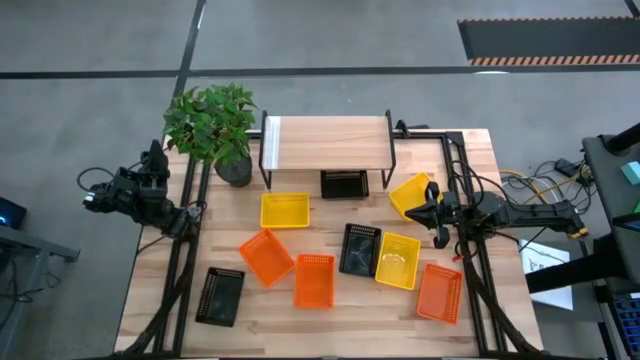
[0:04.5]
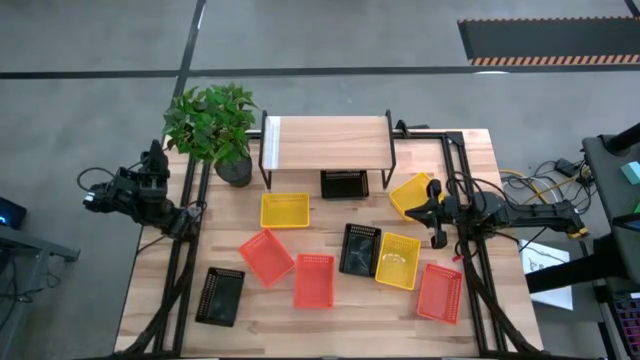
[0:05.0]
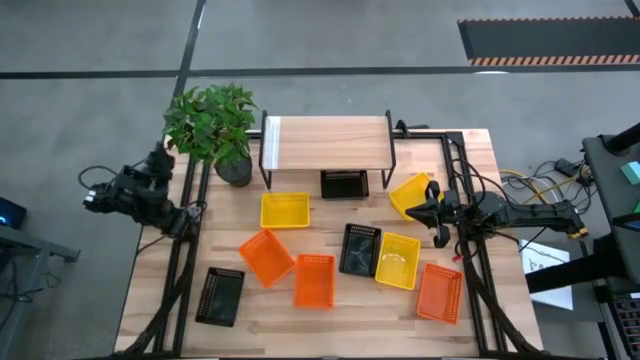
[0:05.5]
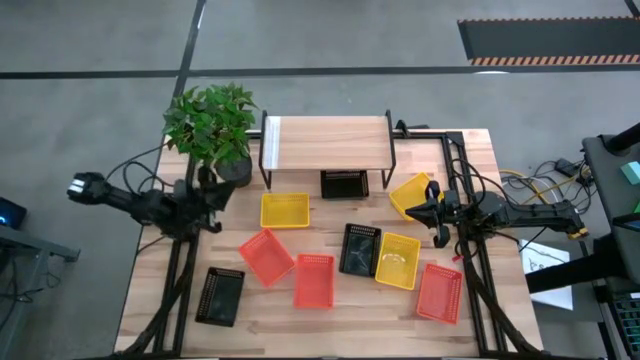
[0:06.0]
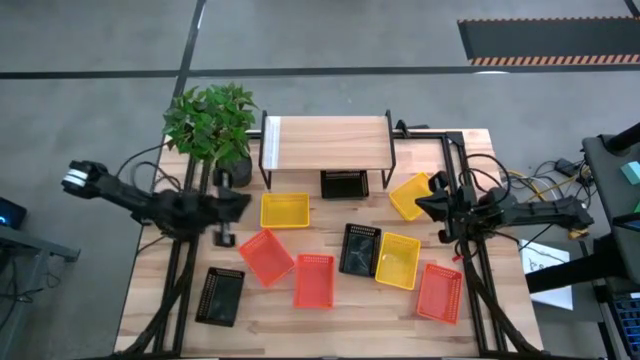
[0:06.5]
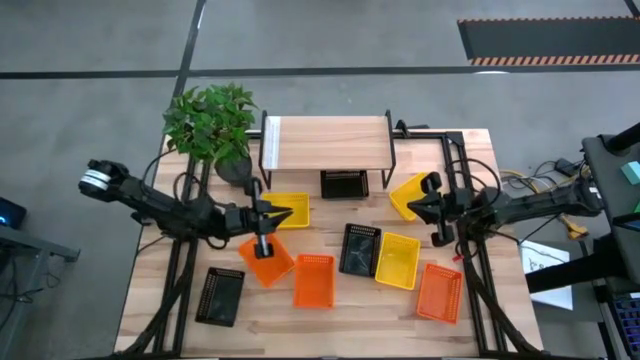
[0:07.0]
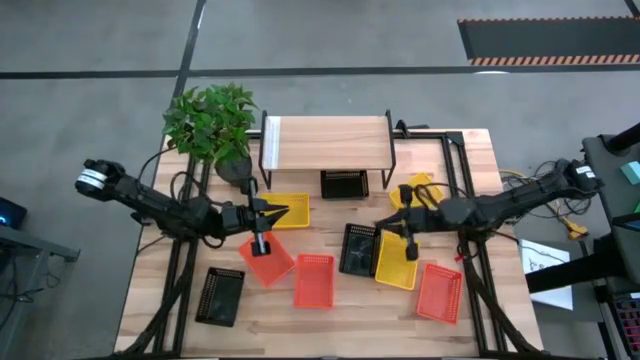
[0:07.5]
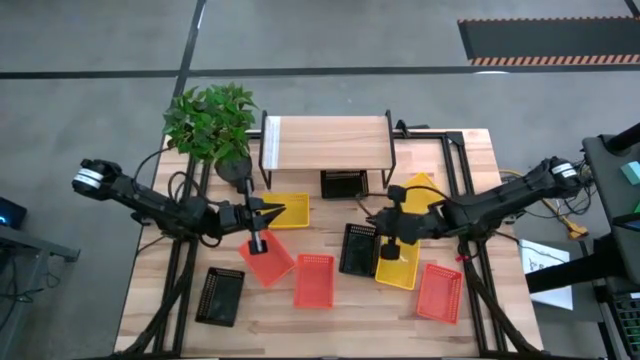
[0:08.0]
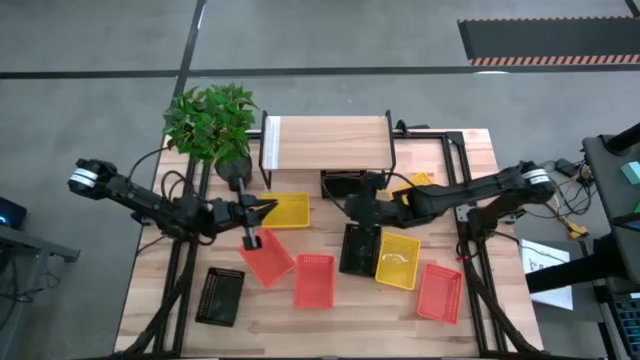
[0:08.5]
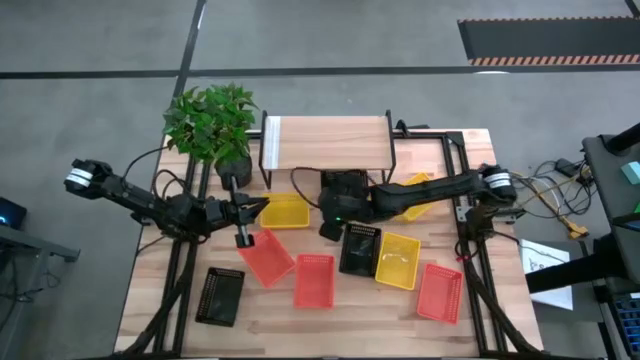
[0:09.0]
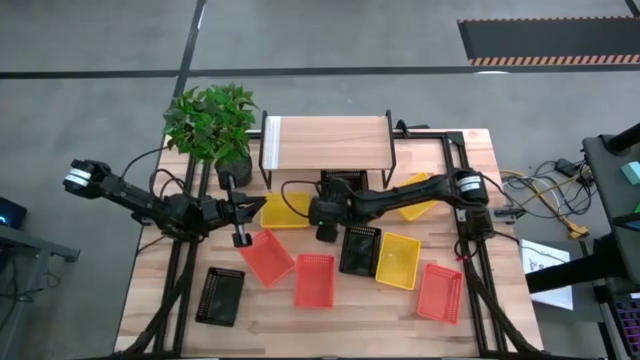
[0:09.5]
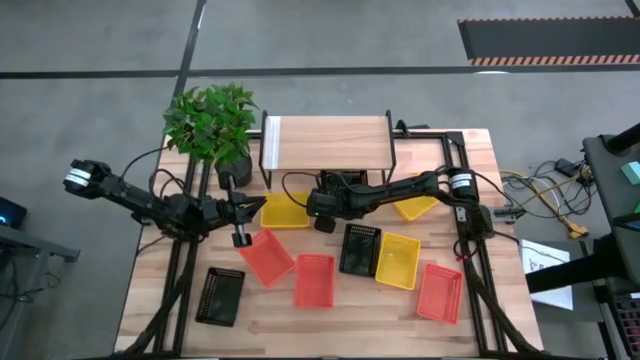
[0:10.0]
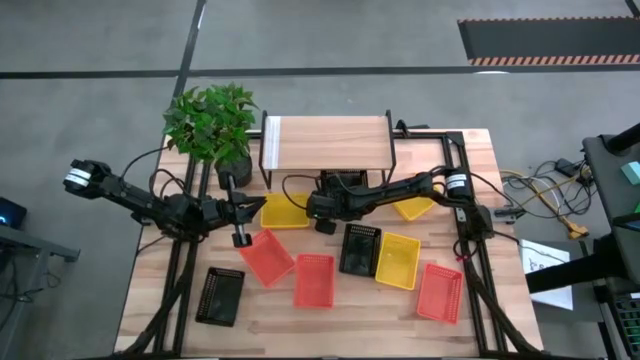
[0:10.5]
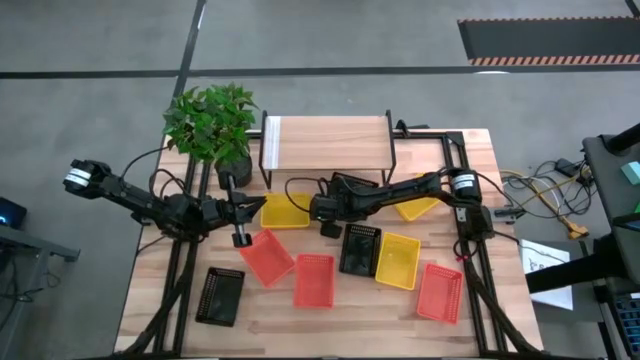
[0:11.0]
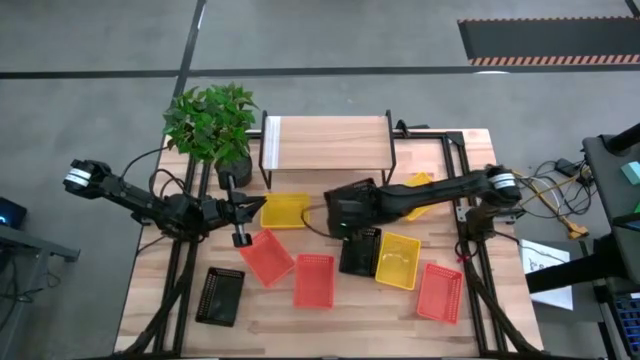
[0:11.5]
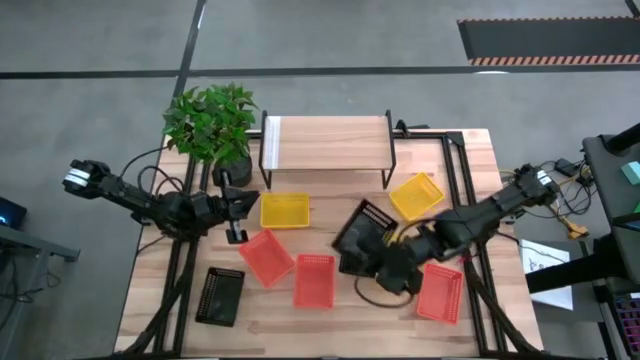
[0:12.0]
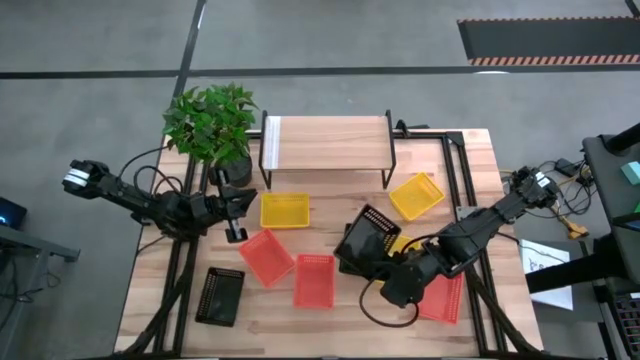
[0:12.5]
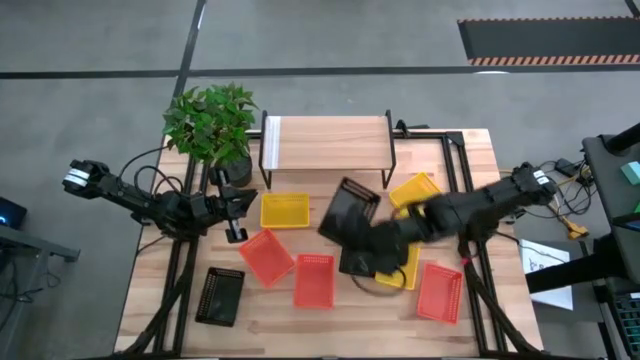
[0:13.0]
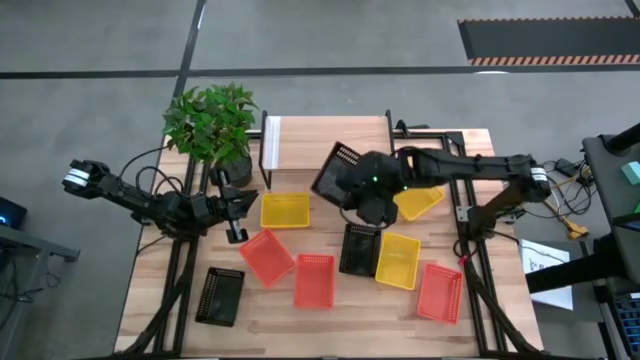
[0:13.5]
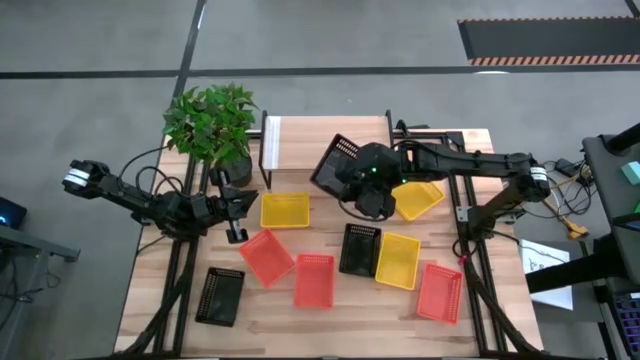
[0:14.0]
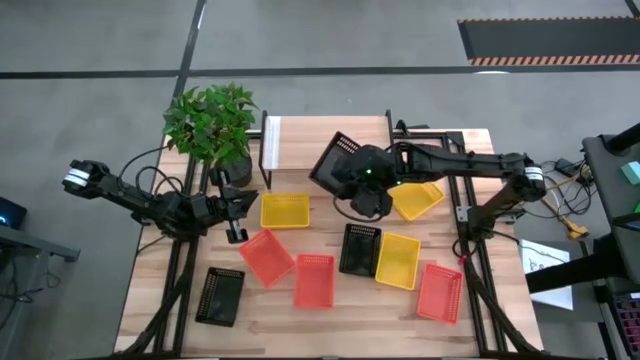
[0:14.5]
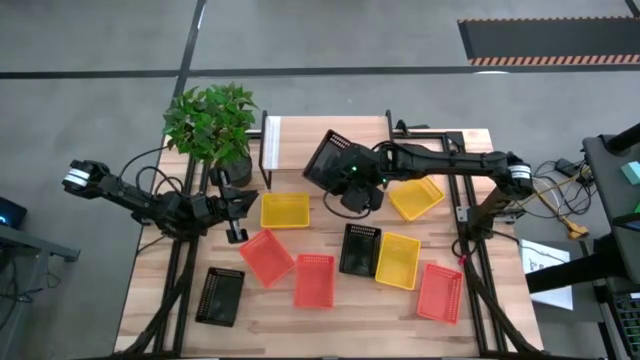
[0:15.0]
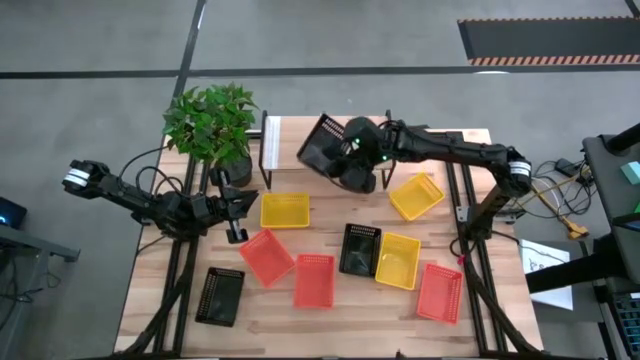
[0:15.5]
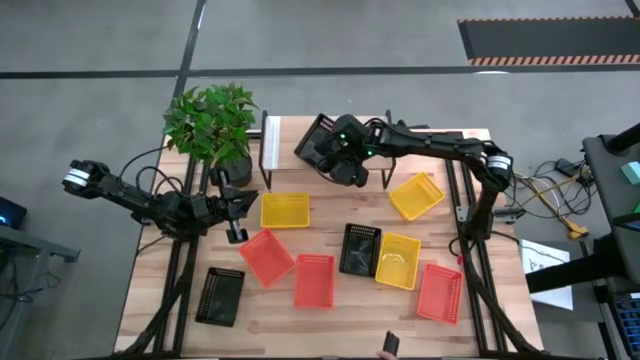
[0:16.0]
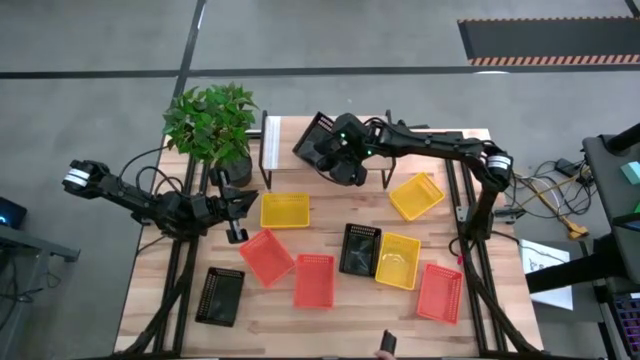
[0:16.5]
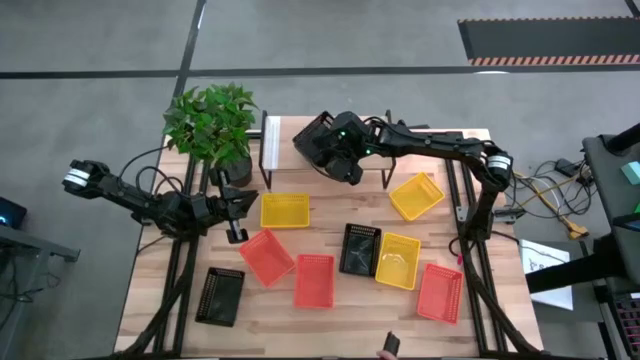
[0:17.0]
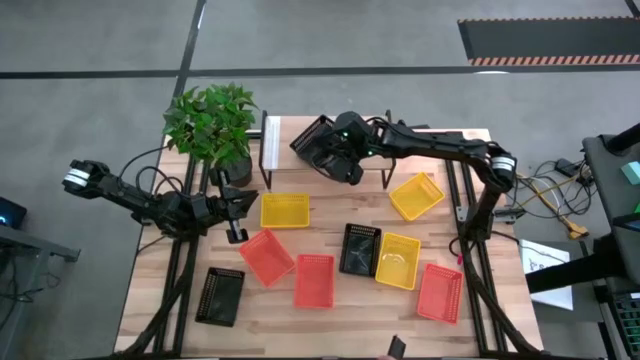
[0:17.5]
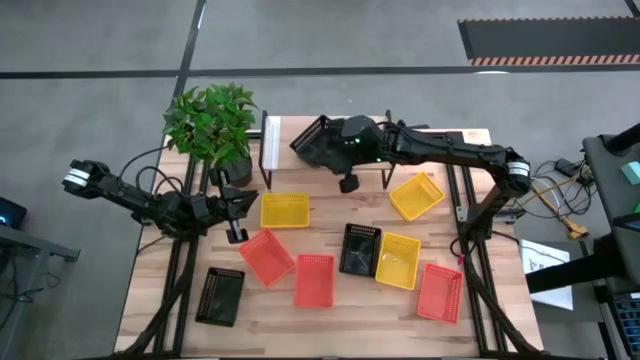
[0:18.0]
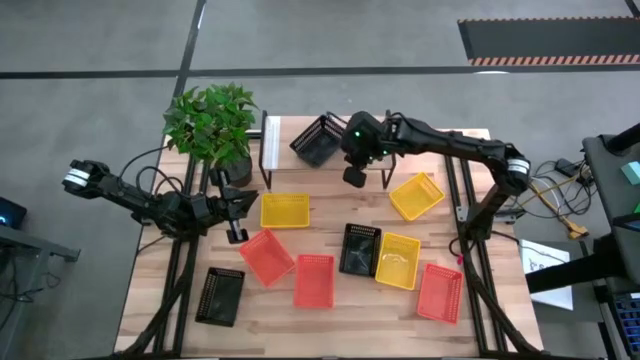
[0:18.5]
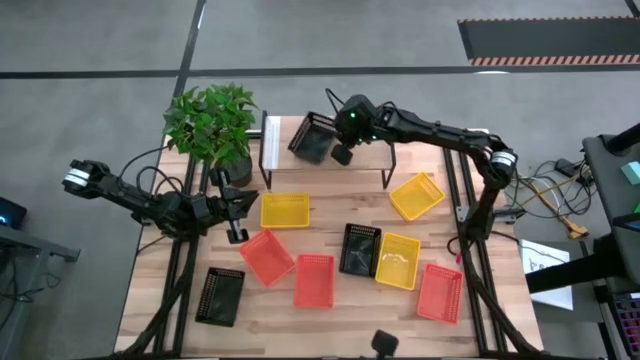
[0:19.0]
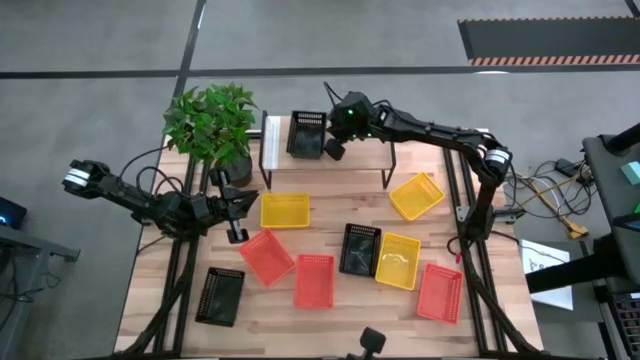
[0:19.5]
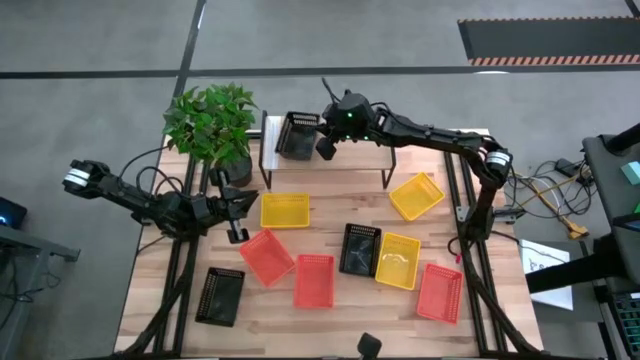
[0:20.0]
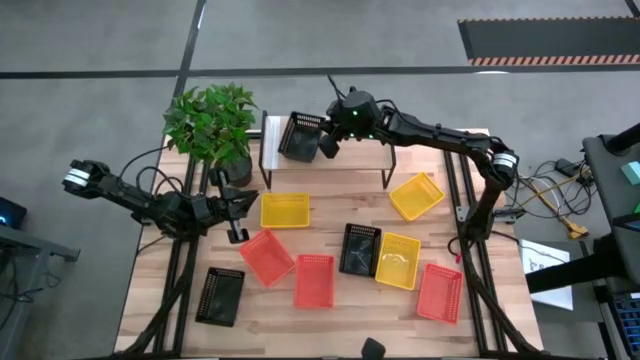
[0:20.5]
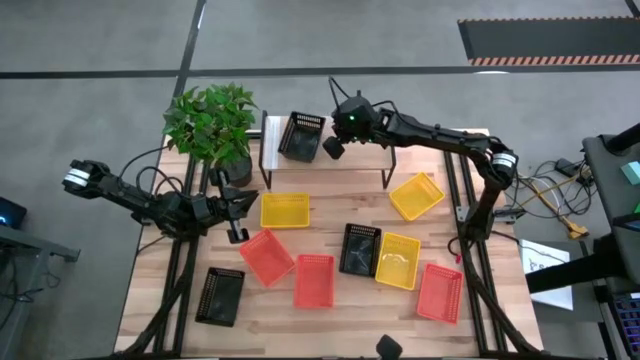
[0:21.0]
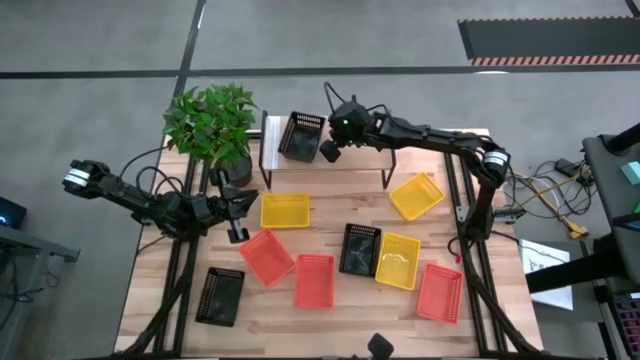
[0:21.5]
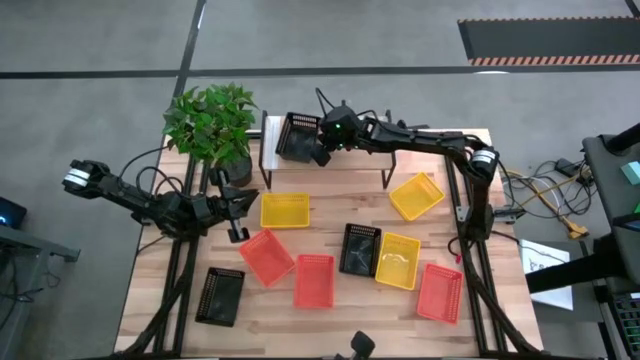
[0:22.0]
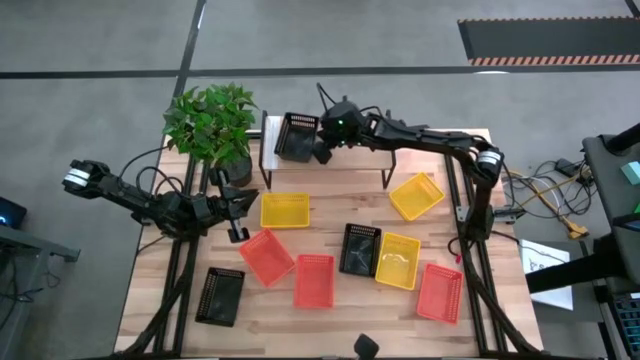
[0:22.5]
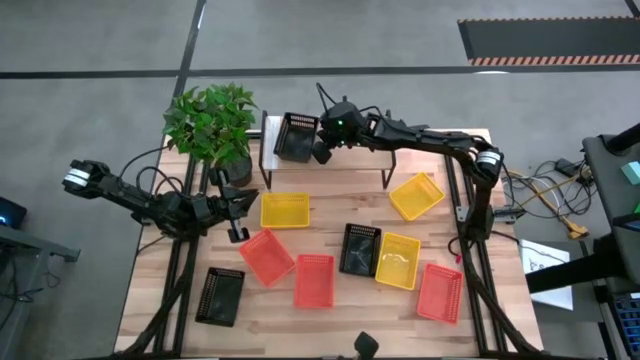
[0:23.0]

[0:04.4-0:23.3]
Task: Stack baskets on shelf by color
Put the top right black bin on the shelf

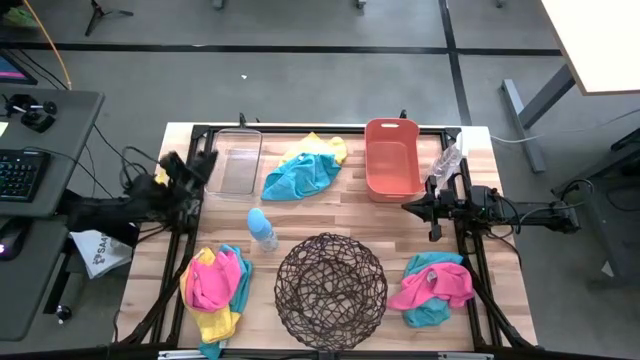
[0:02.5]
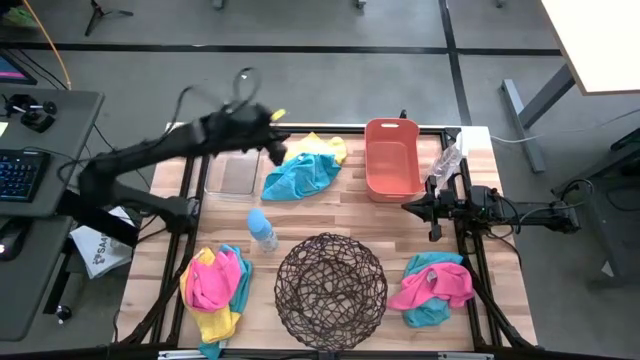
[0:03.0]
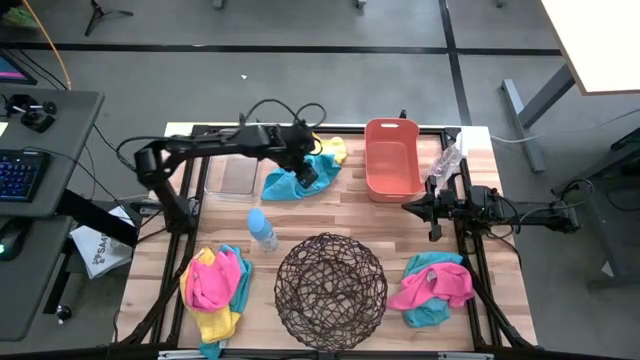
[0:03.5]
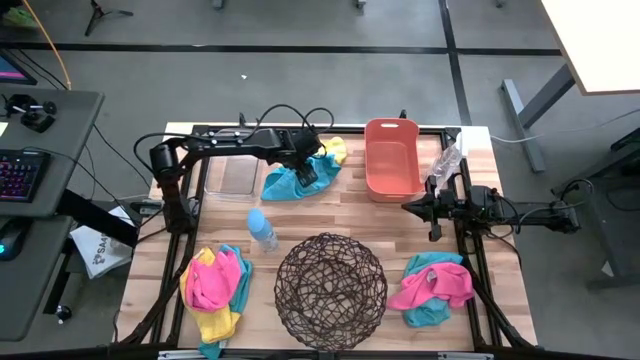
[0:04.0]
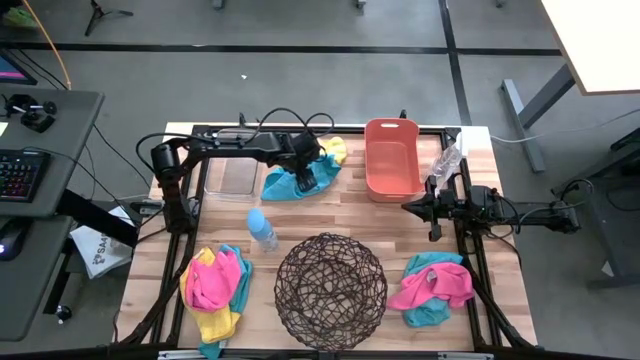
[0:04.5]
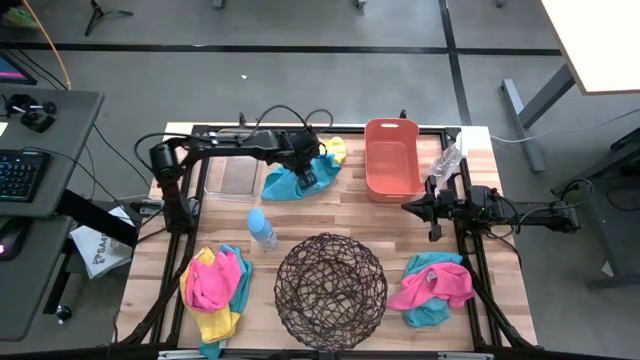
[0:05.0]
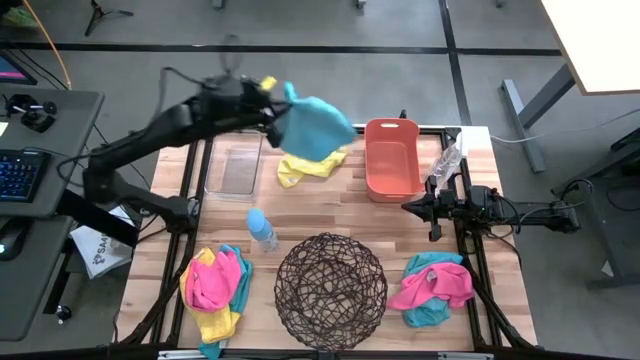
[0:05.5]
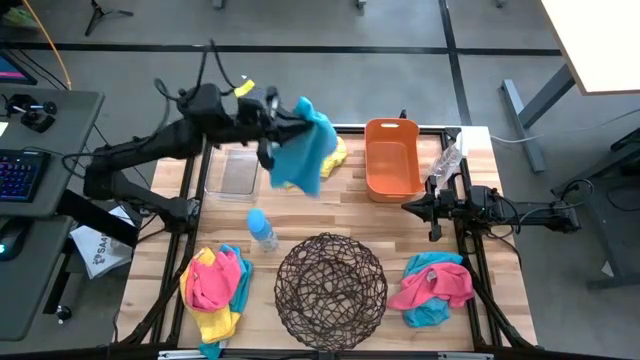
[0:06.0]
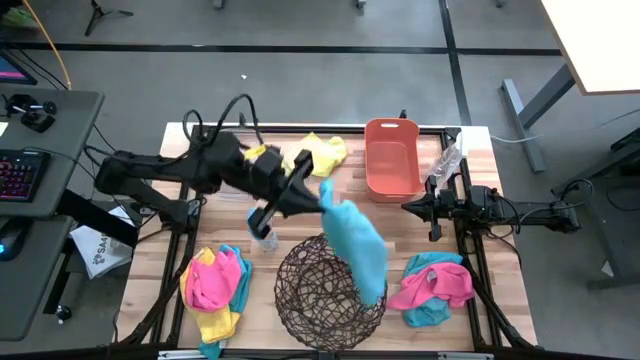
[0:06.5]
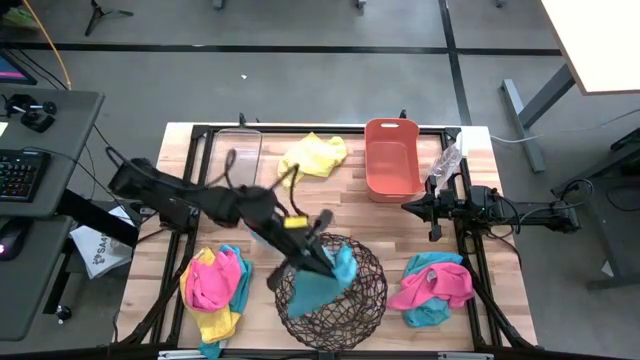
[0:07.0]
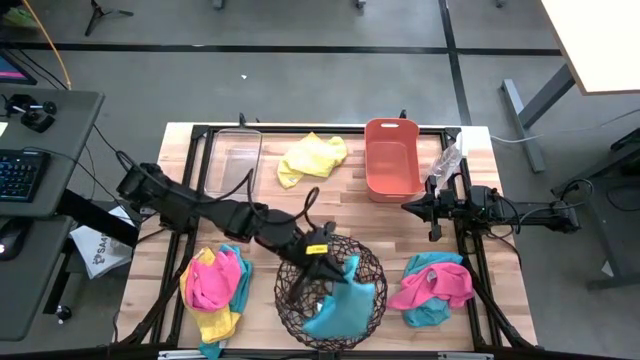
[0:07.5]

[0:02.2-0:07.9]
Task: Sort microfiber towel by color & place in baskets
Put the top center blue towel into the wooden basket
